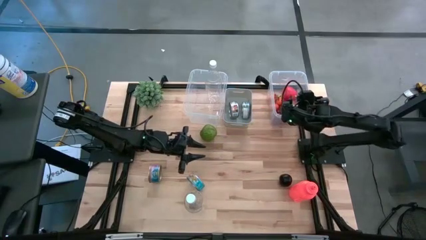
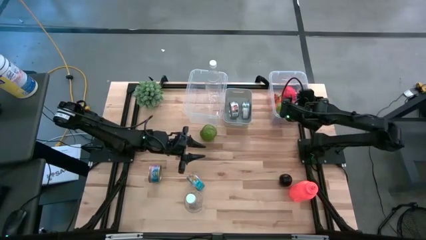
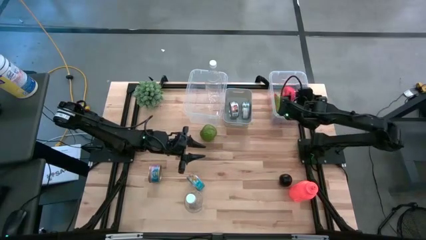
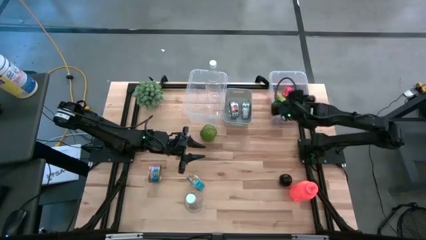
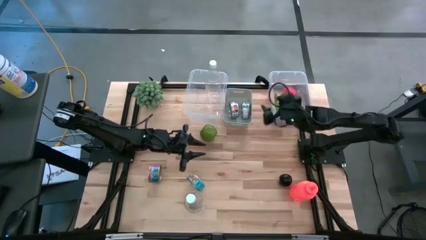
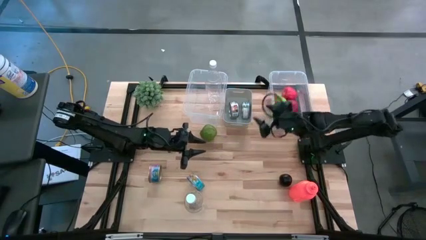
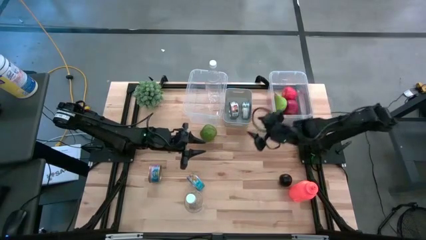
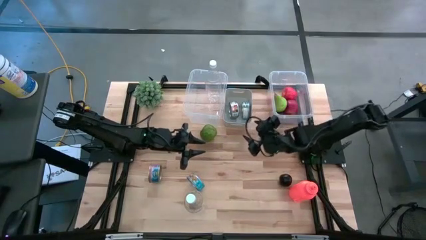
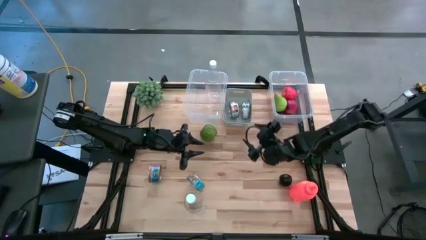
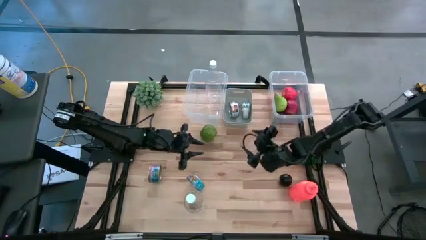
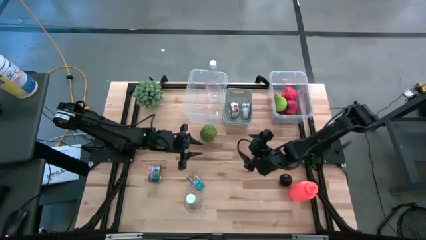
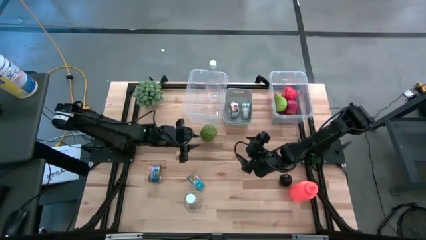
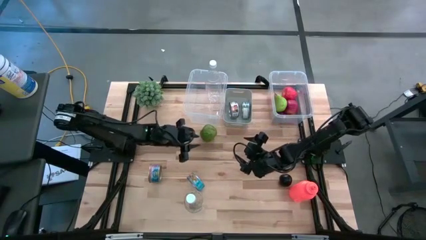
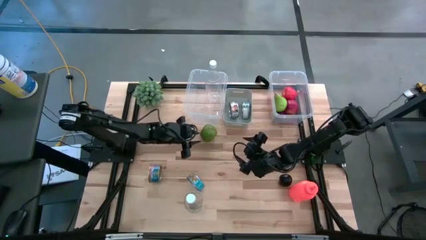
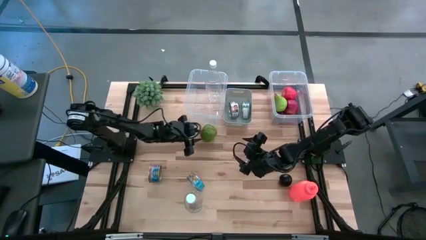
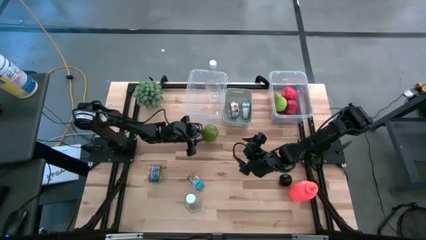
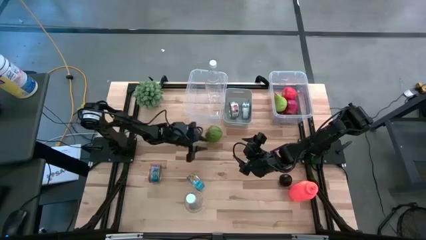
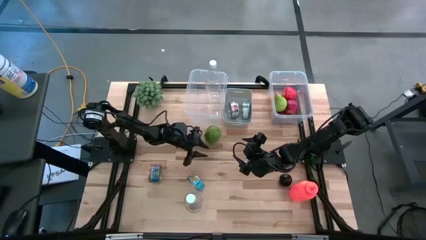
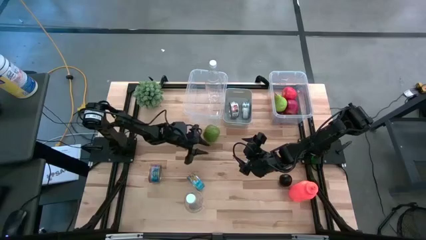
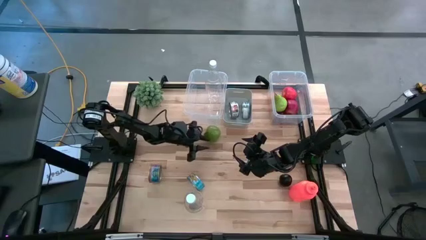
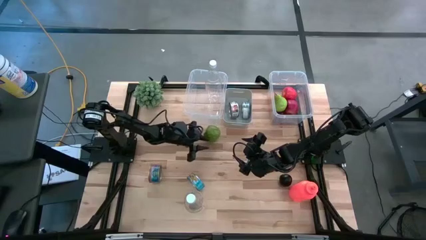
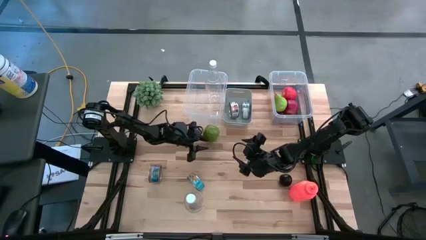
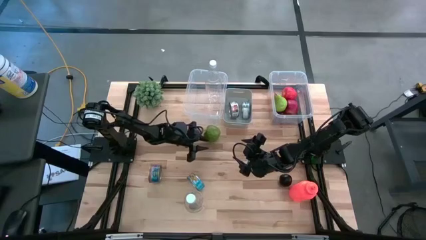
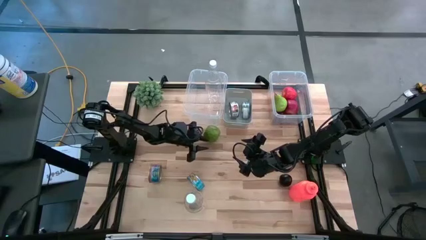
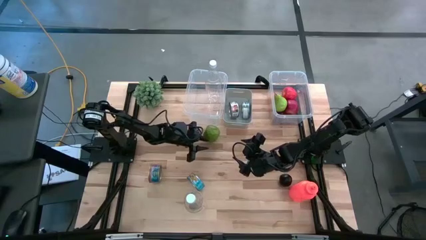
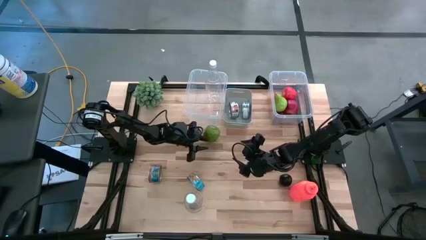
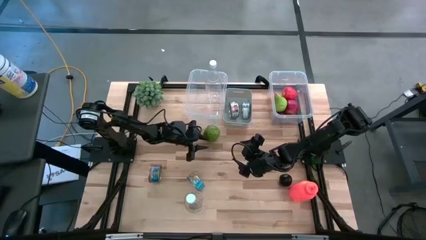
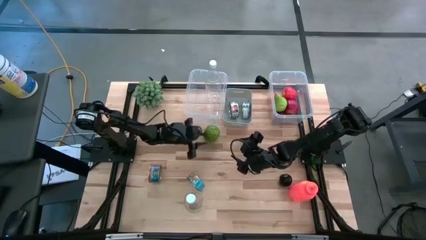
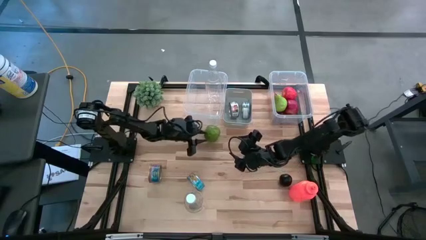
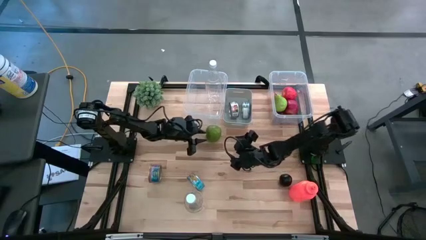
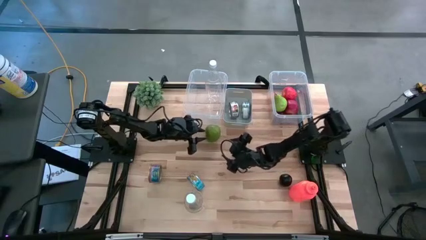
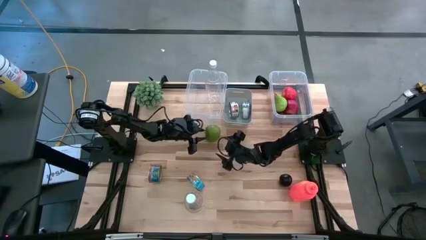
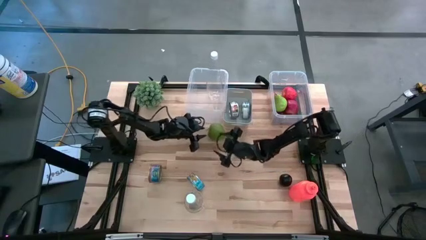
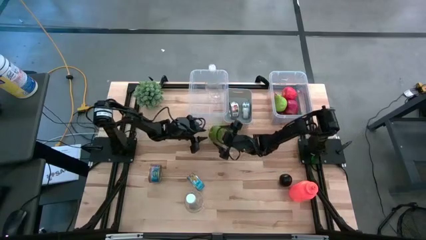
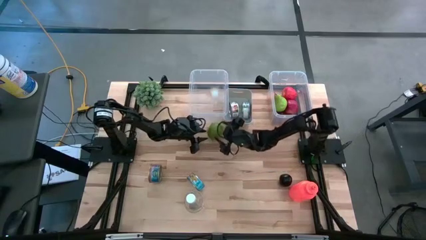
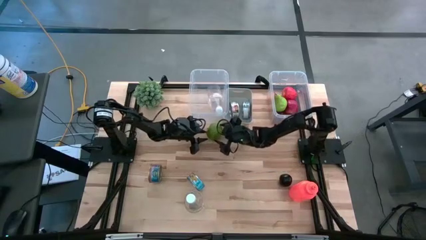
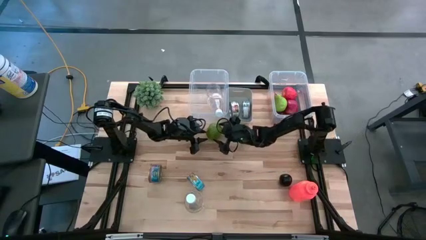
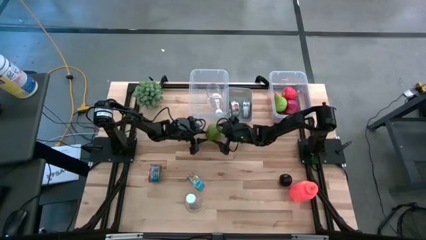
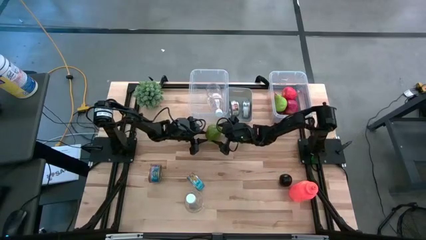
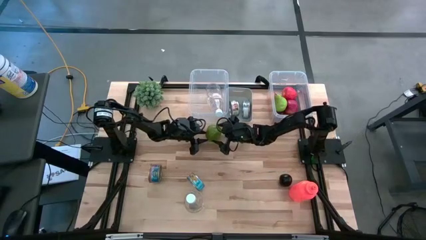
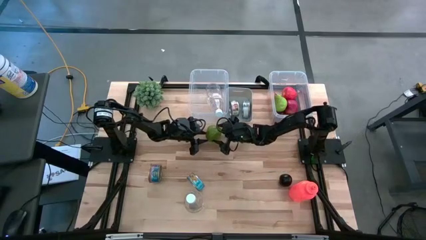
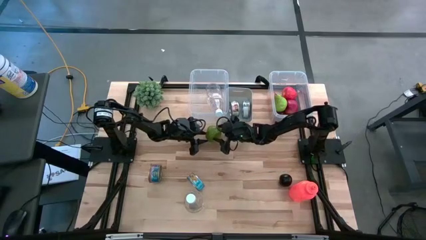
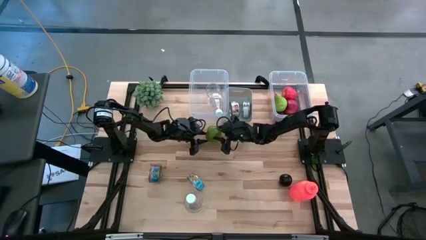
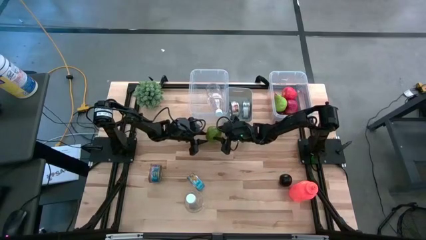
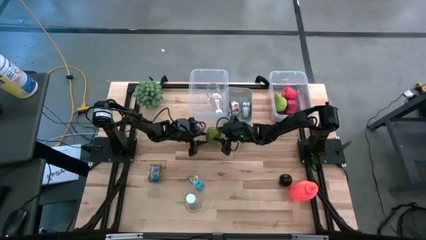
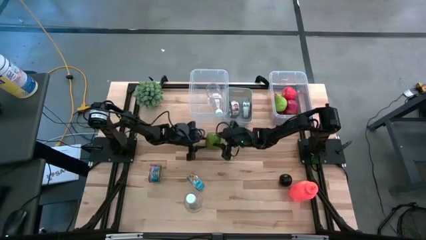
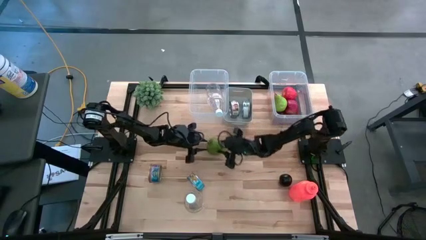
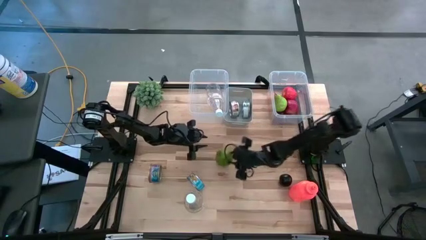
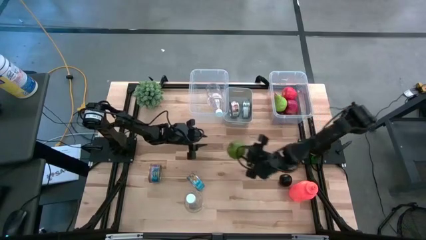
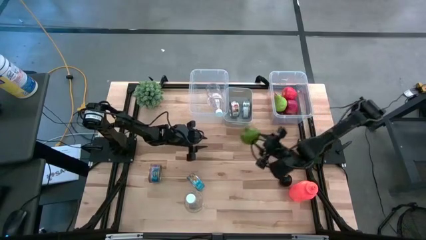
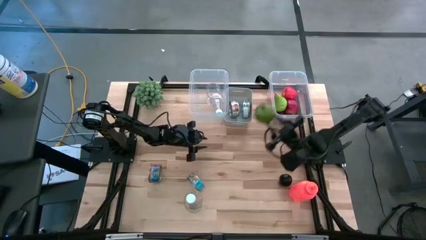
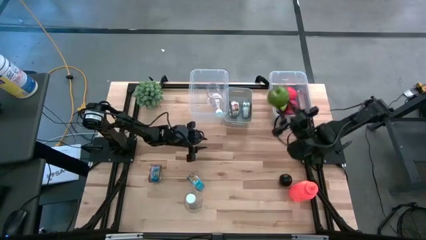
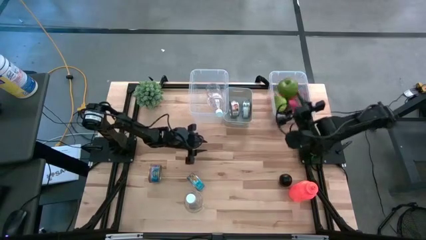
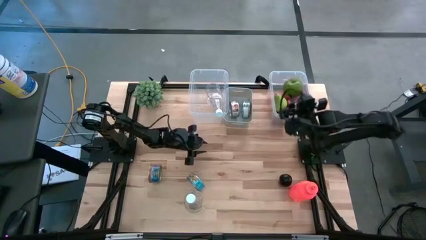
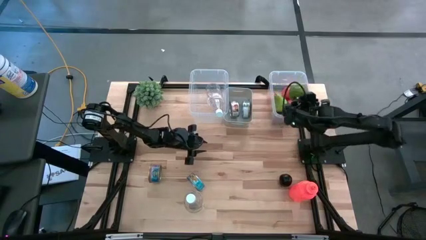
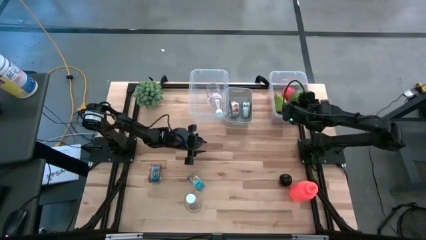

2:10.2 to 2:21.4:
Task: Pick & Place Food Item
Put the green apple into the right transparent bin

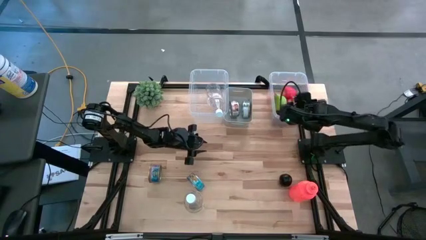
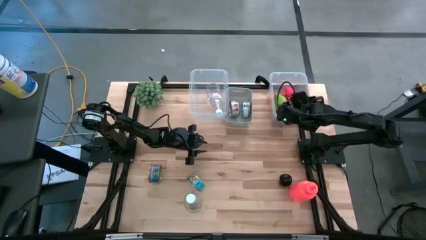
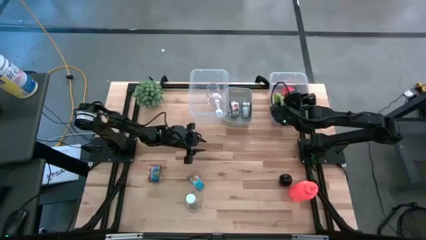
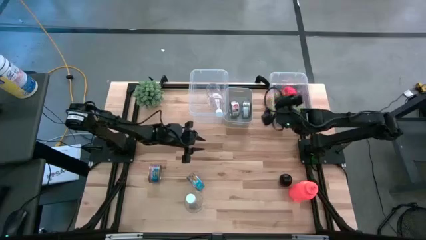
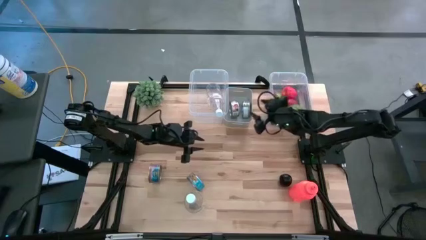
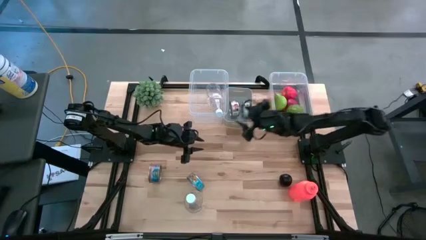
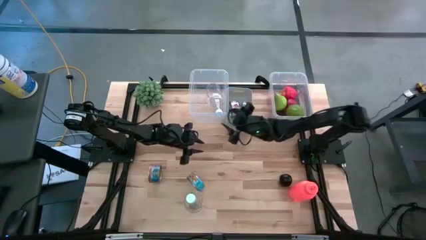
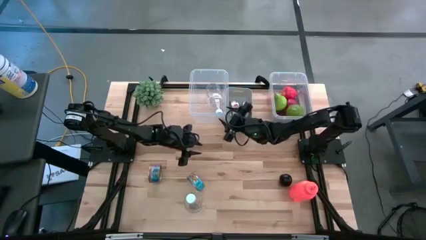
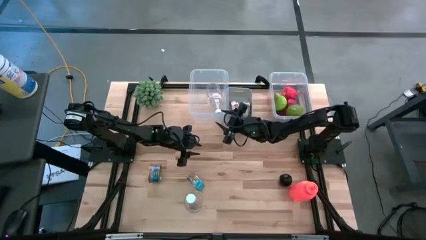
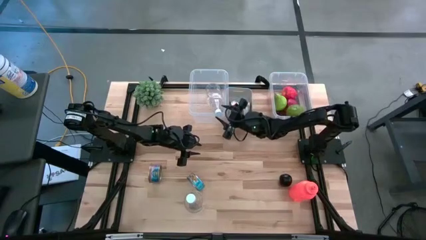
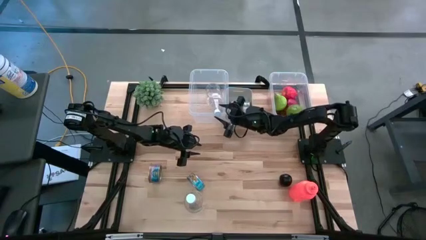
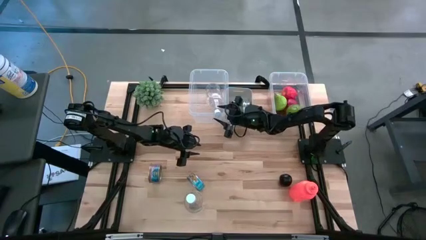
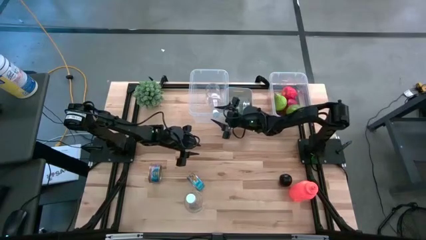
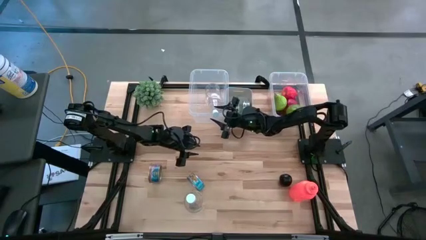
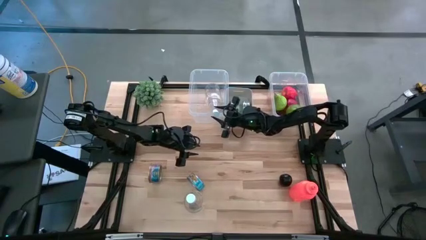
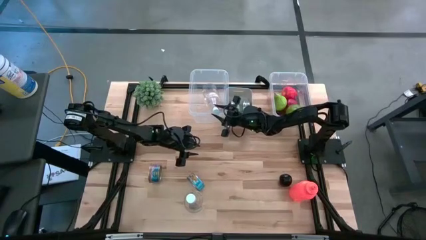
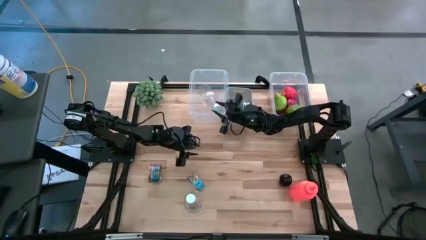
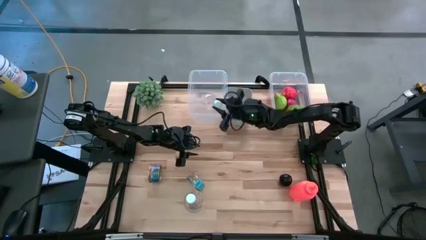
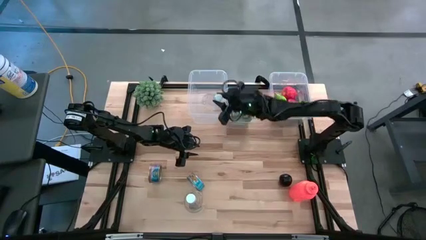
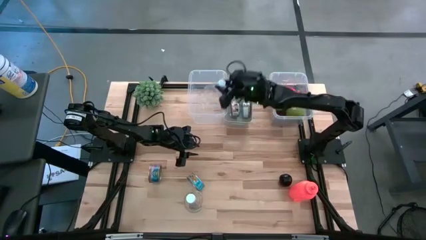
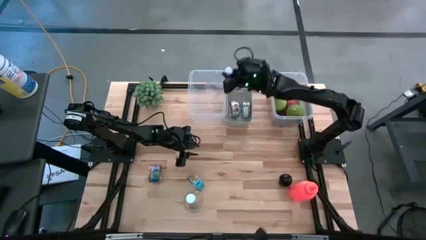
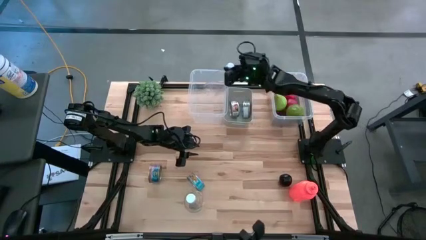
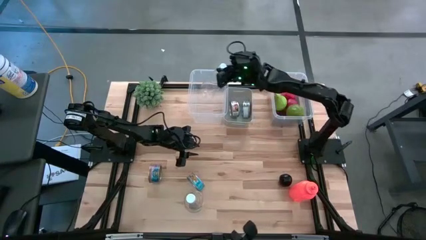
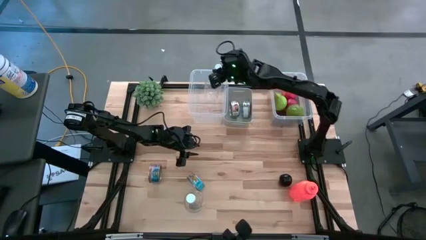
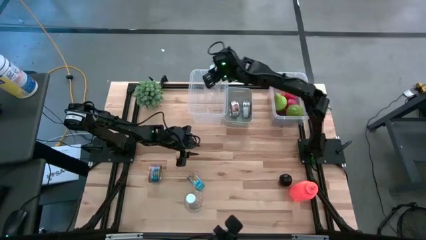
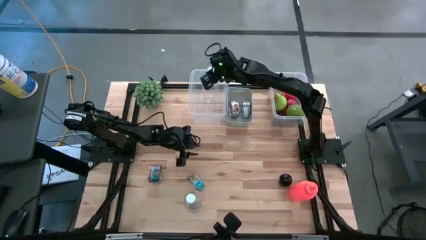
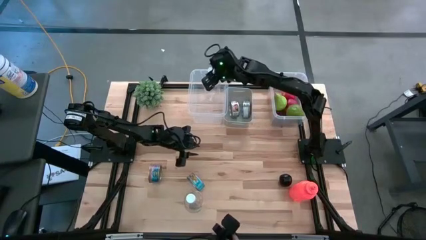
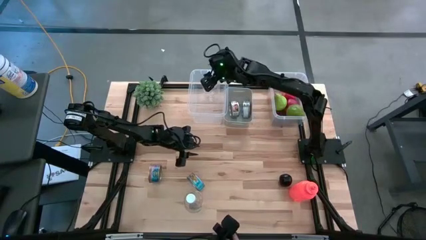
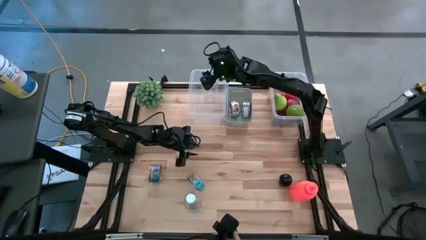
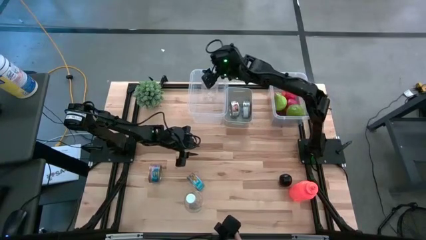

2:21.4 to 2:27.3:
Put the transparent bottle into the left transparent bin upright
